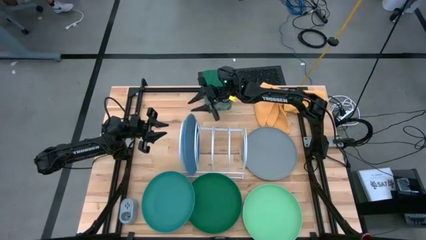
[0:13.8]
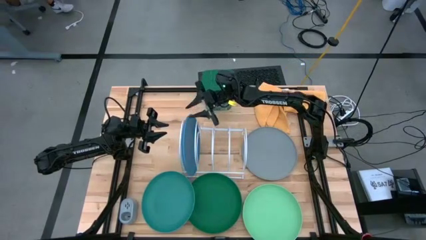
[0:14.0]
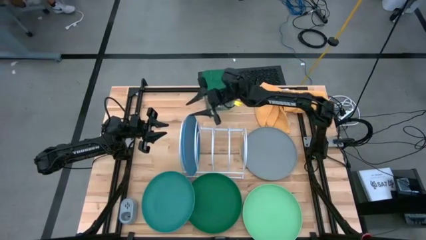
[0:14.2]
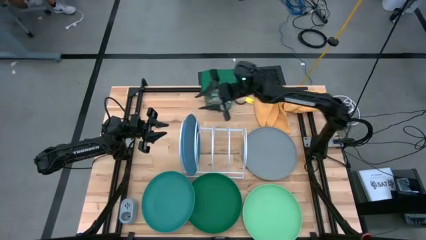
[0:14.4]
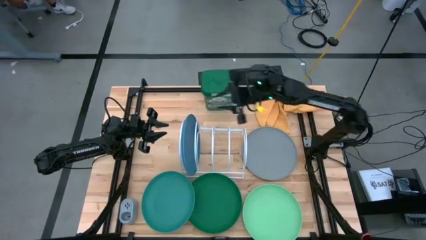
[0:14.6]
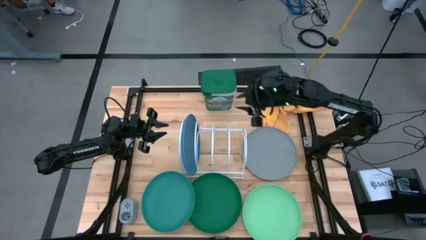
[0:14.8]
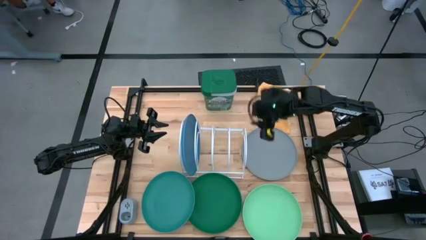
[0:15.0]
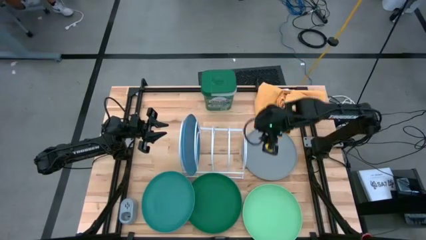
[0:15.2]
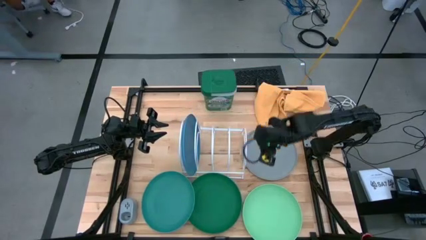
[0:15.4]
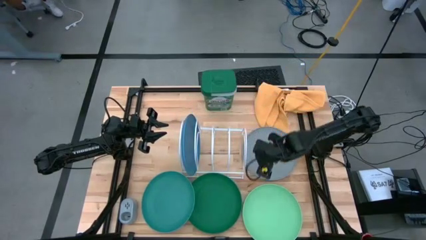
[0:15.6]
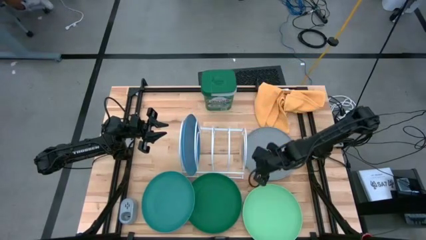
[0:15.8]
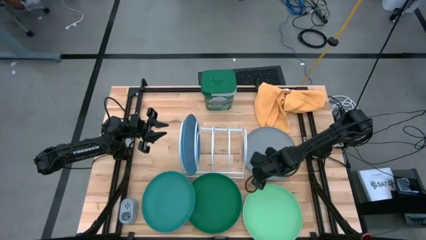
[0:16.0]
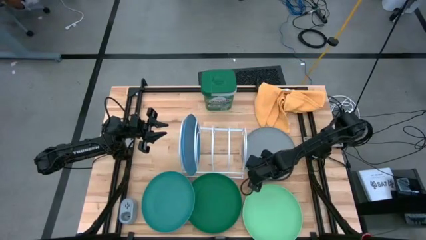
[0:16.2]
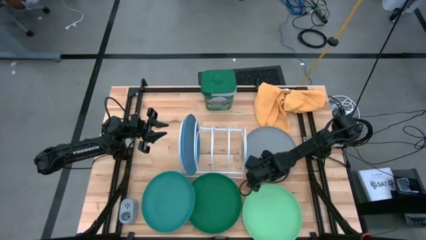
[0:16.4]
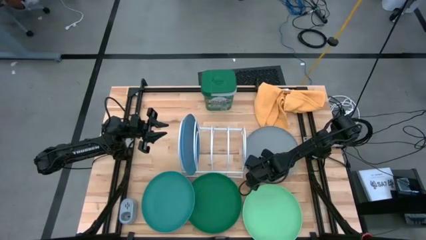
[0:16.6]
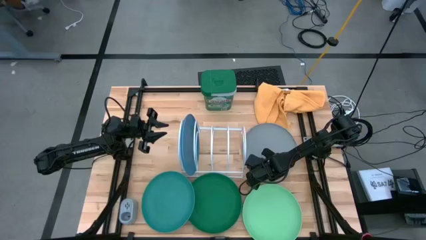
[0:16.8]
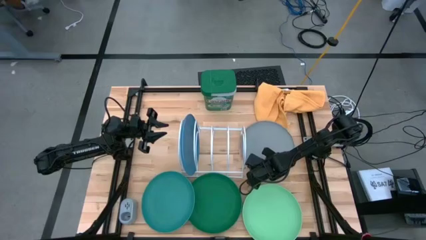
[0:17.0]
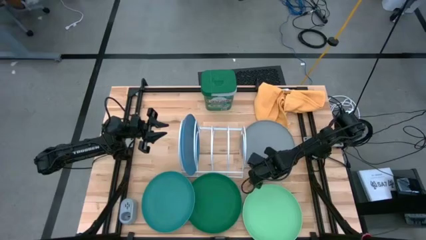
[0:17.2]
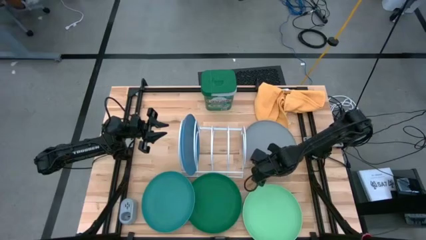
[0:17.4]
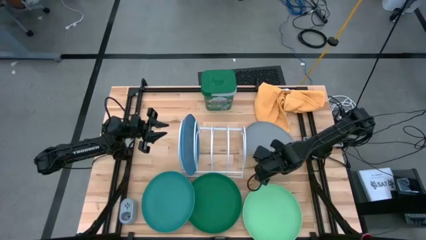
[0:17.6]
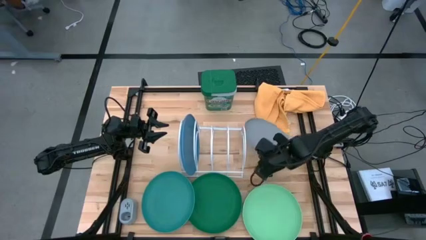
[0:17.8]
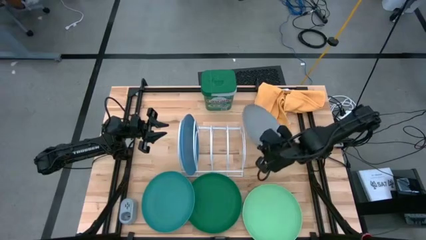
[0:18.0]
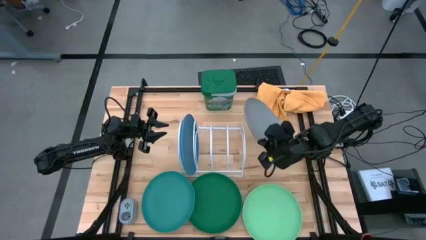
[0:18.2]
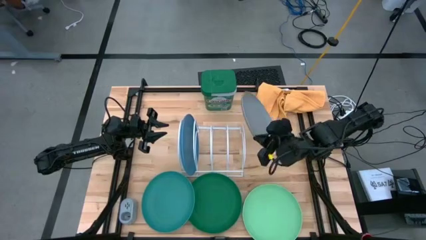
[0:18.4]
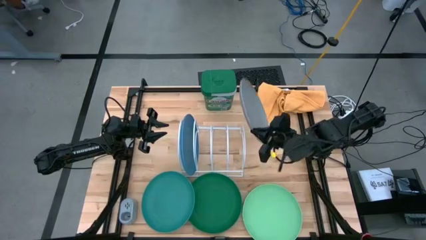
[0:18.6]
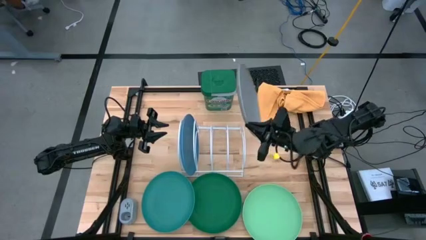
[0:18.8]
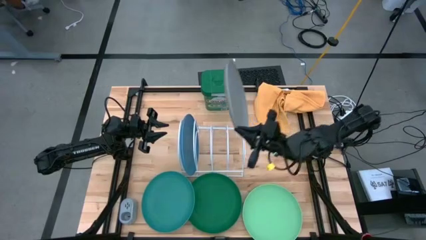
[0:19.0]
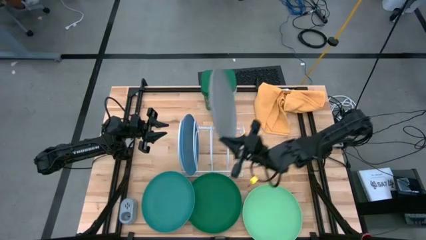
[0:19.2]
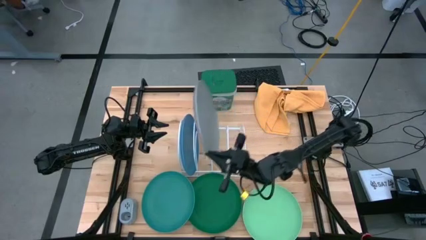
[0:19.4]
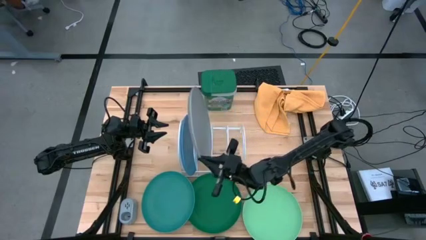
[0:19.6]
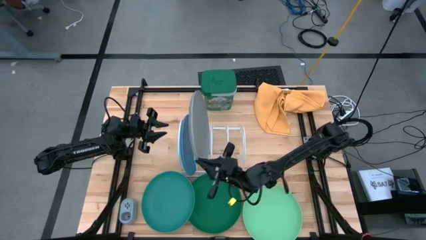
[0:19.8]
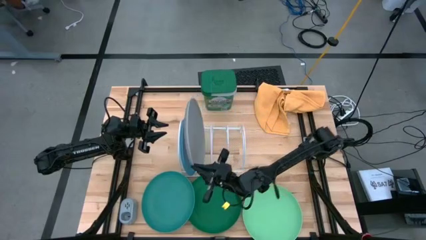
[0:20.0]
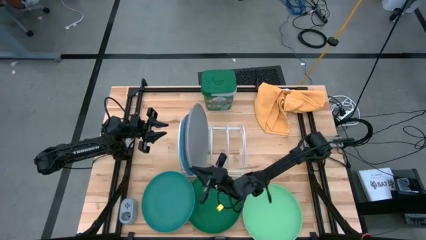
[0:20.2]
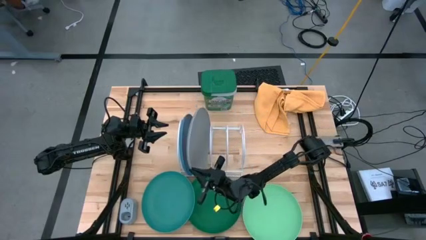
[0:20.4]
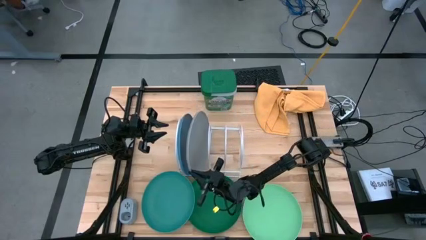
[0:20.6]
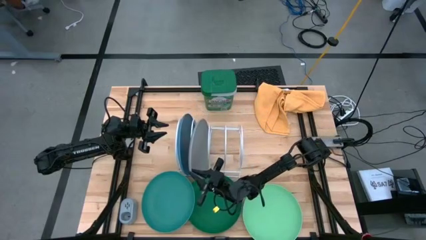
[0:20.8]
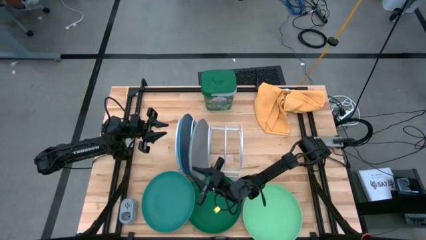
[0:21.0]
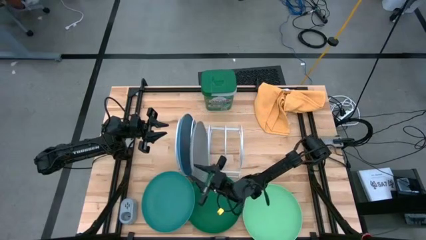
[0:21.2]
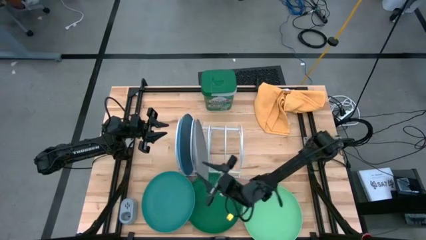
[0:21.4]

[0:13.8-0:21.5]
Task: Sort dishes
Put the gray plate in the dish rack

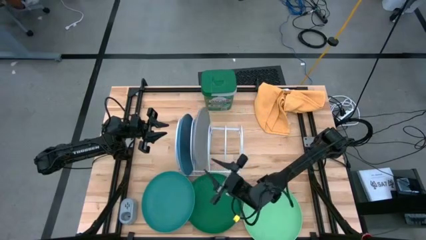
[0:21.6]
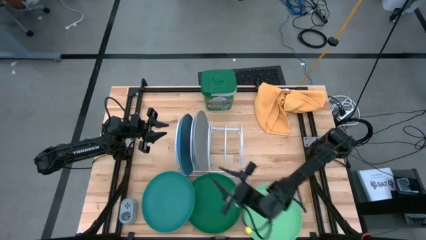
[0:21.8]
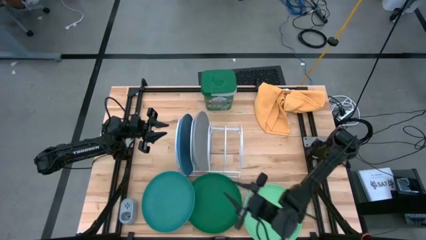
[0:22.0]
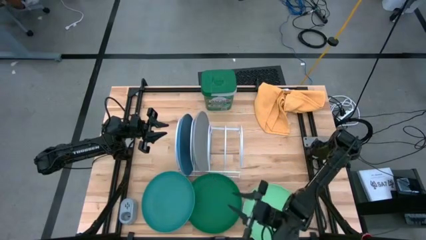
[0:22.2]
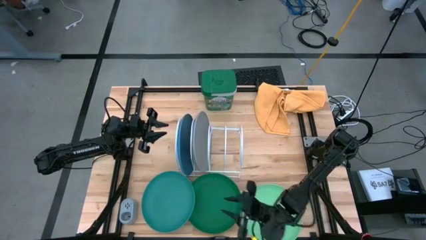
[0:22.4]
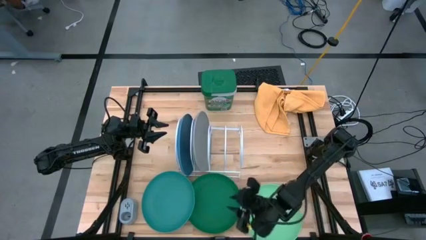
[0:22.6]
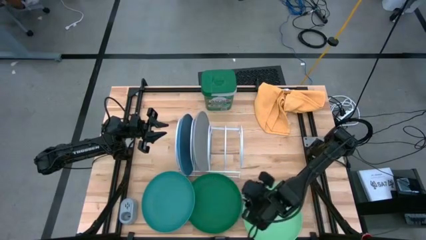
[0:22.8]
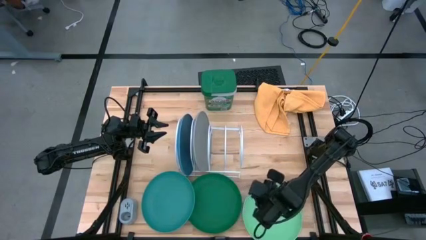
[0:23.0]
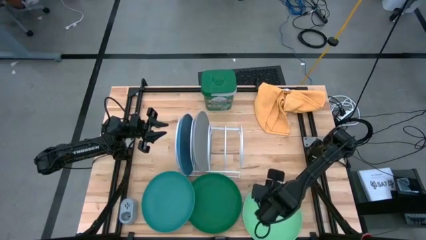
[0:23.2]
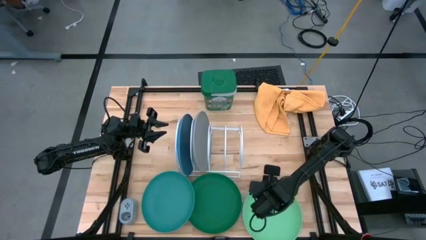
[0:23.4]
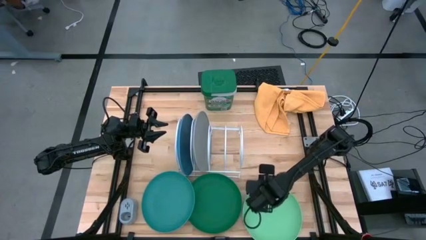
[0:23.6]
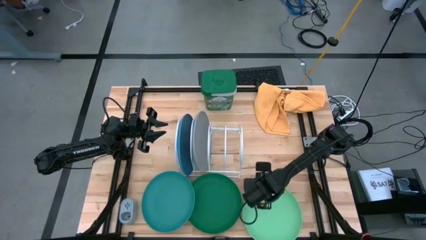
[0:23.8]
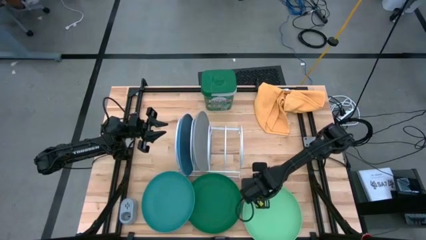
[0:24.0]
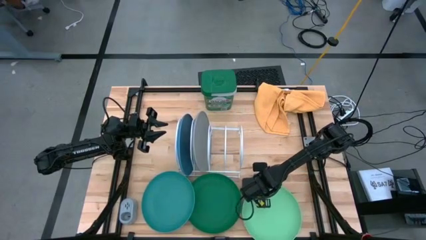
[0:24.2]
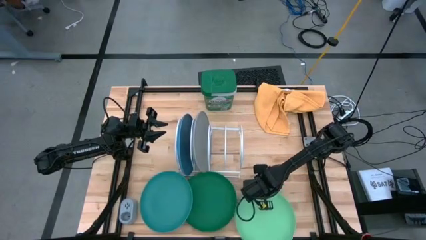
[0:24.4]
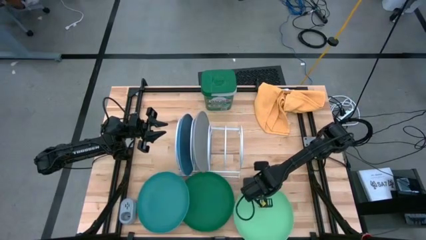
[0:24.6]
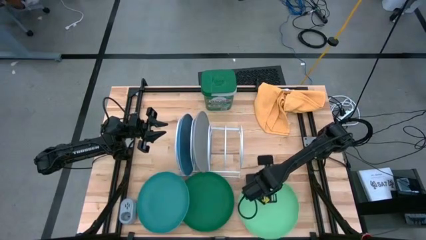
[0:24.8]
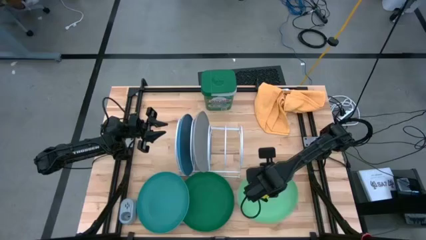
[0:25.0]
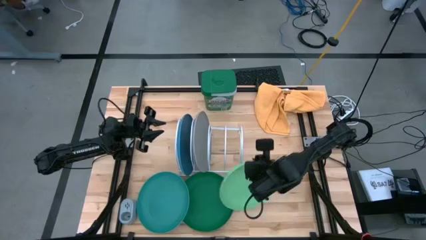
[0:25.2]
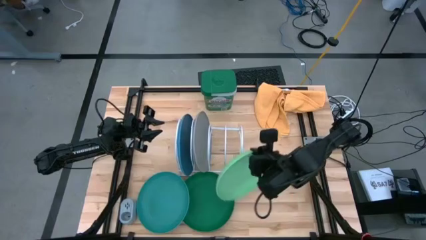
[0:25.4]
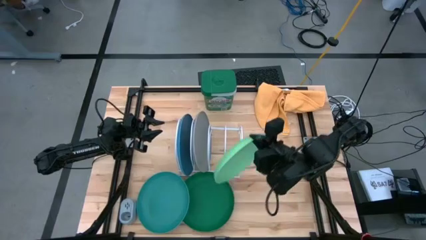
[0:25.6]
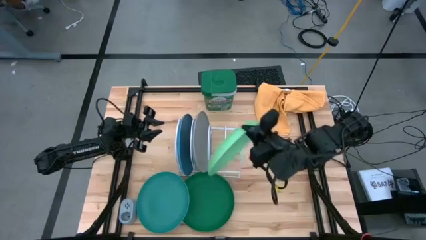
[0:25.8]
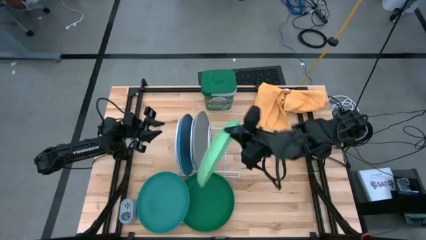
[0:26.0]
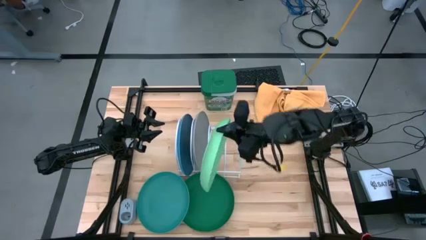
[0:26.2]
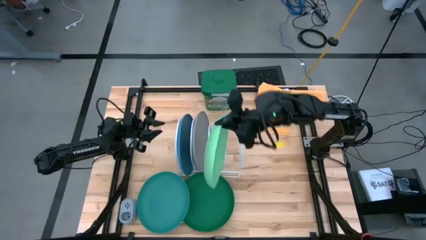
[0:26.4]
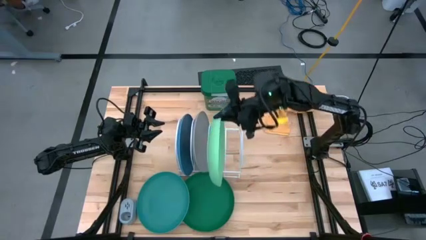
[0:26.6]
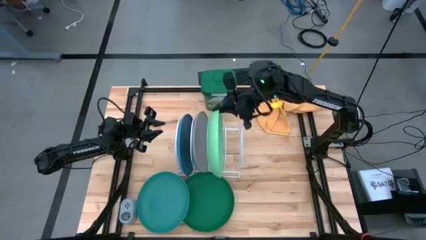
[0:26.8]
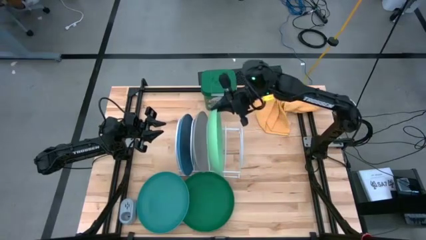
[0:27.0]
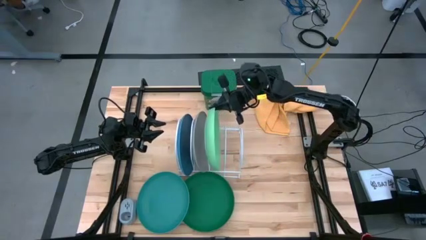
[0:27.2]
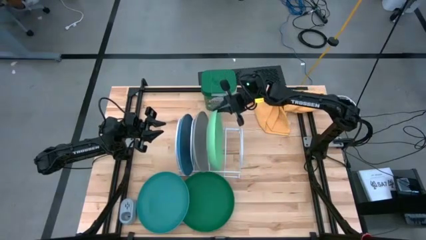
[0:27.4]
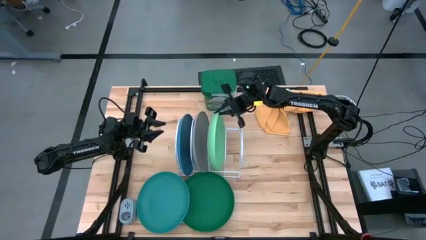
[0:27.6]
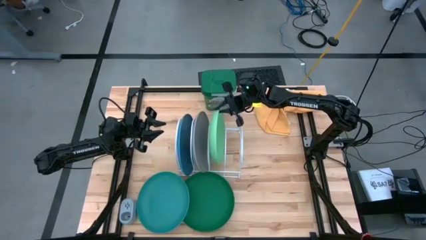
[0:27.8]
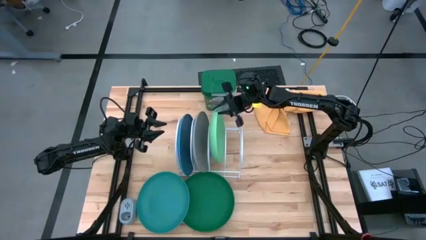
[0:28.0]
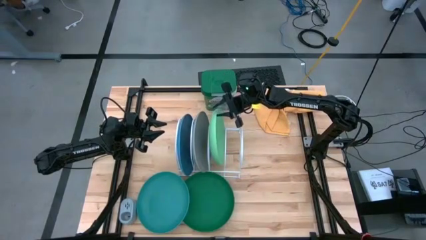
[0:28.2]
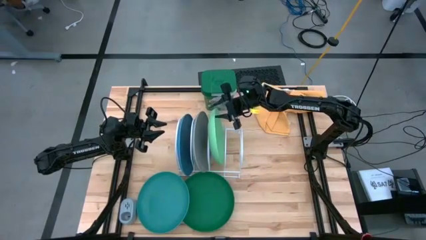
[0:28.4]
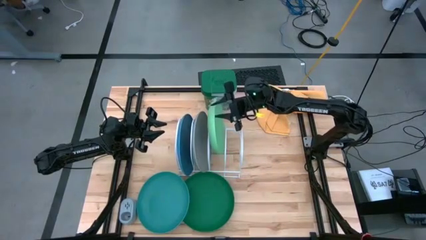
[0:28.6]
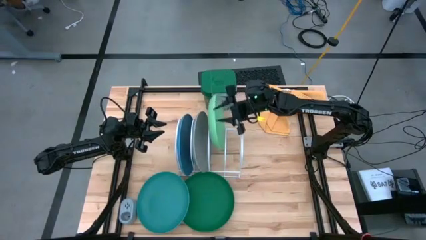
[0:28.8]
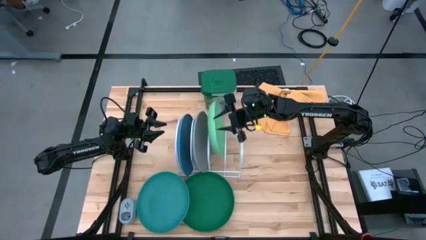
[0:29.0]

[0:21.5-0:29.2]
Put the light green plate in the dish rack
